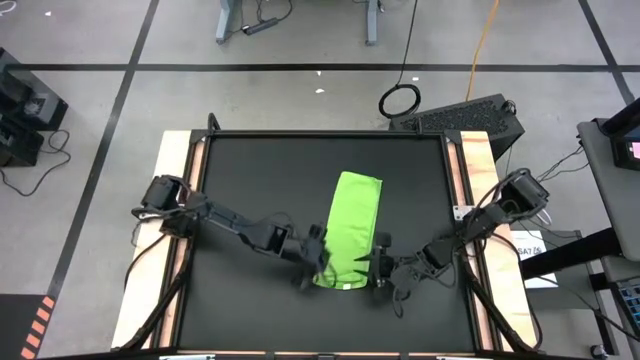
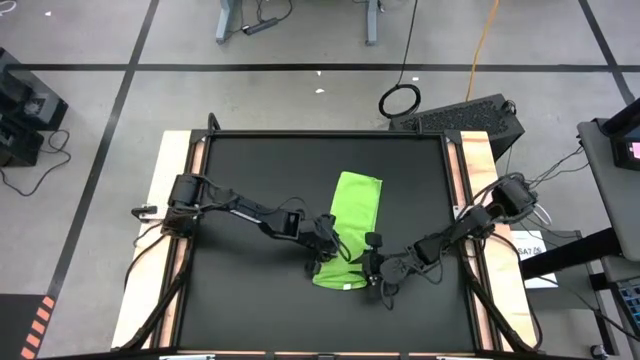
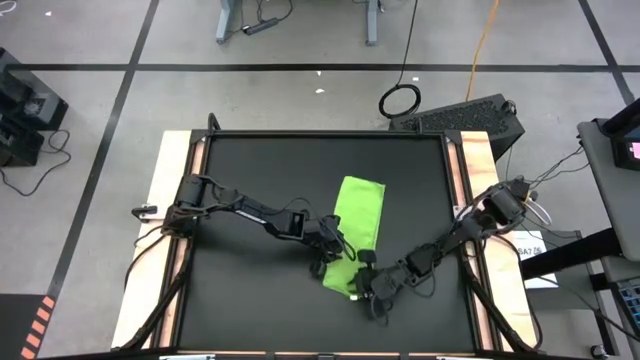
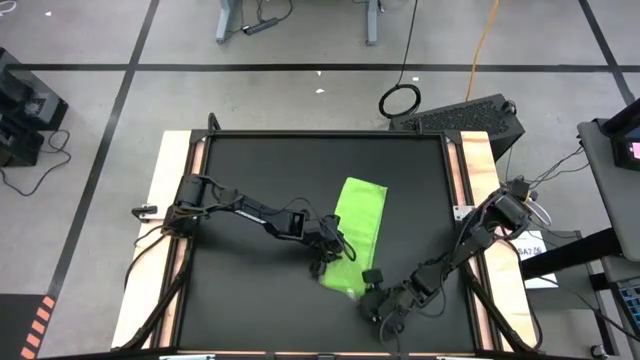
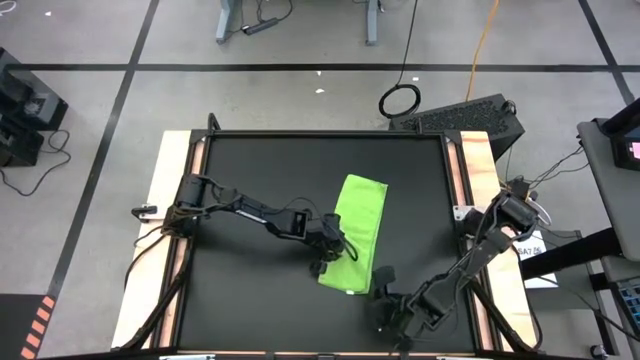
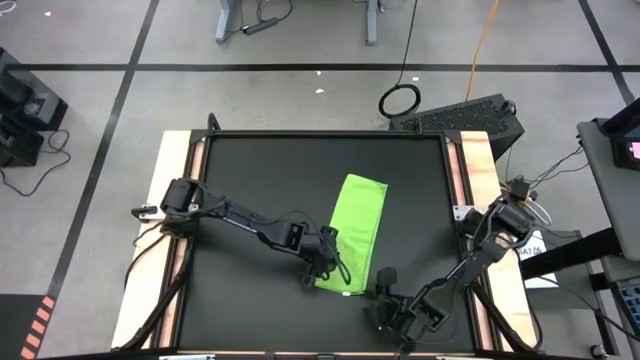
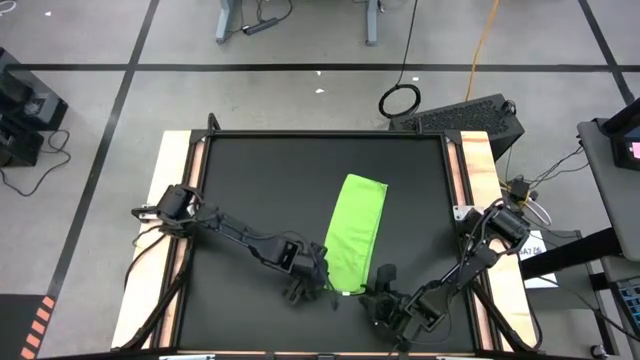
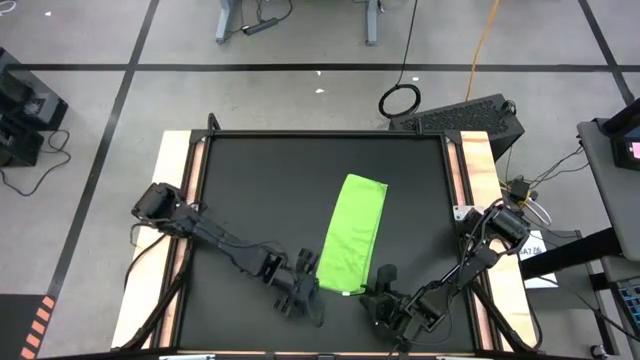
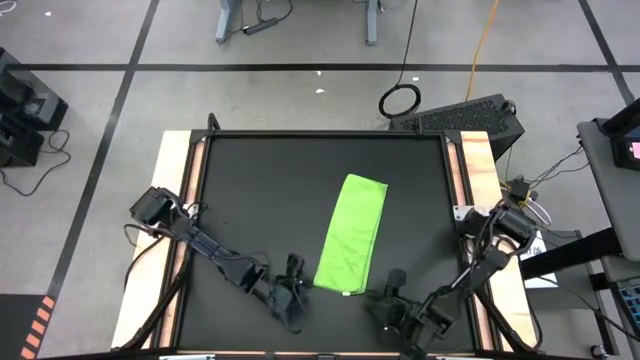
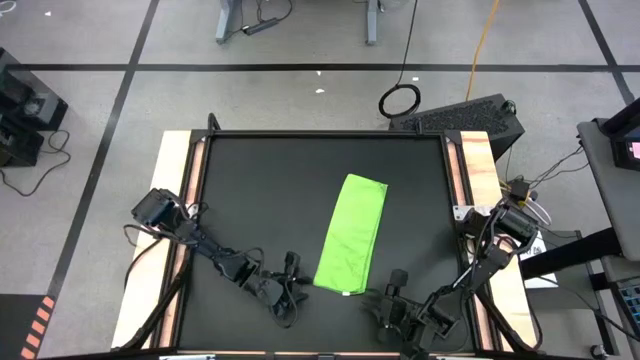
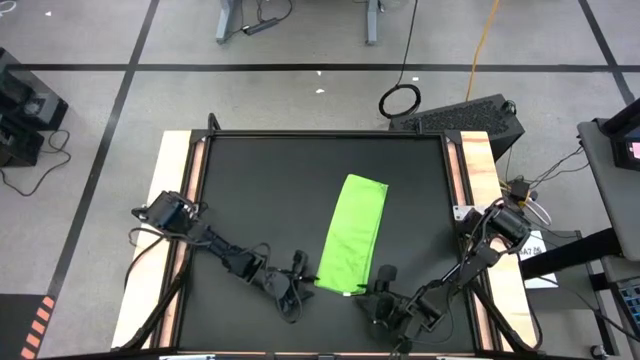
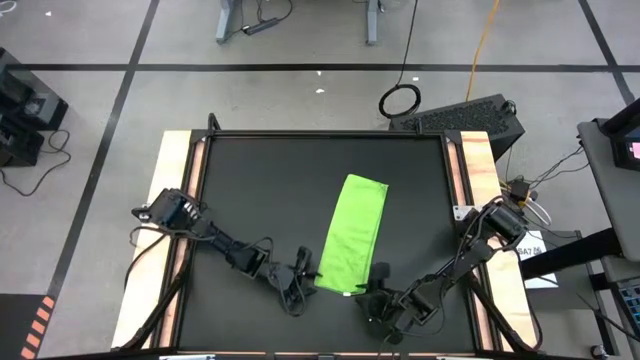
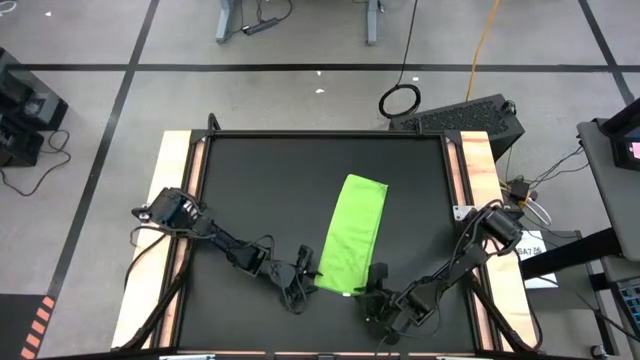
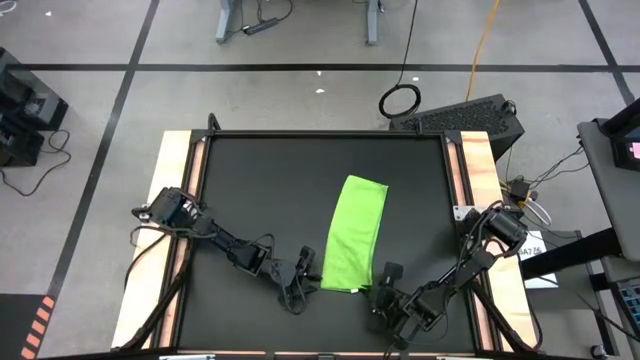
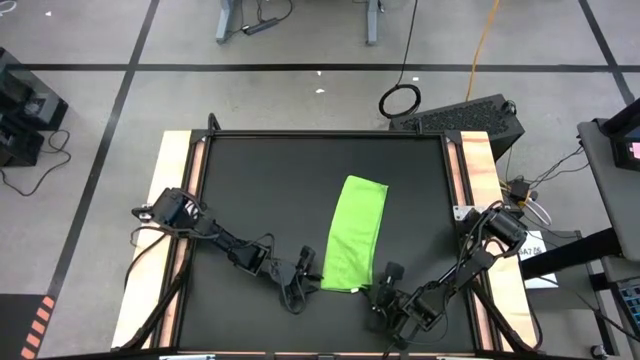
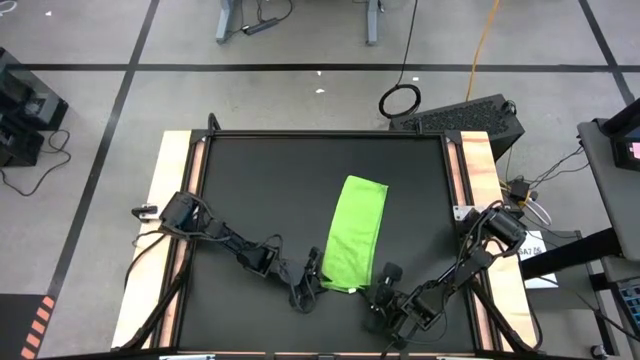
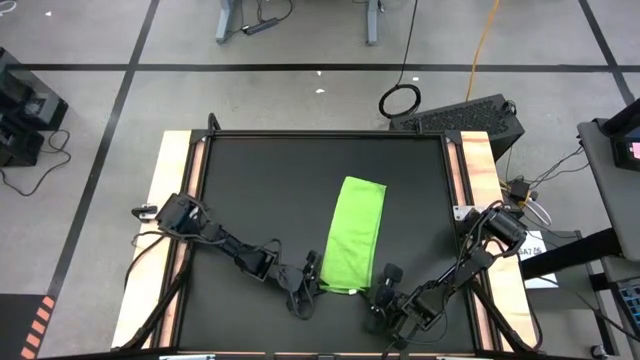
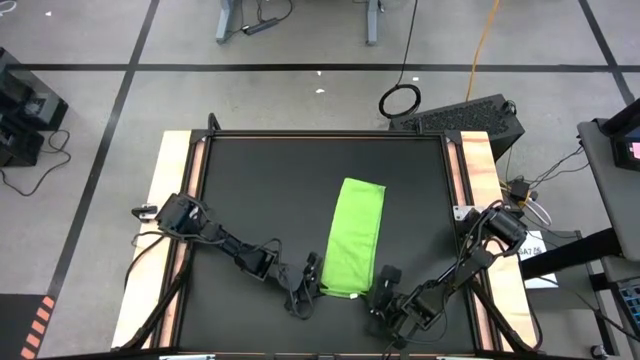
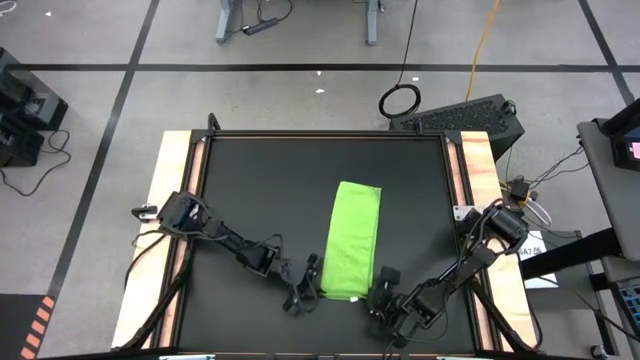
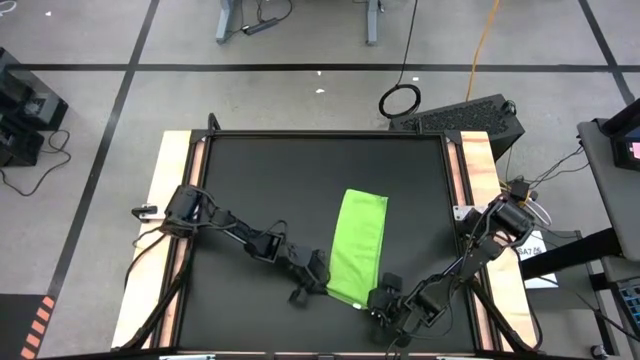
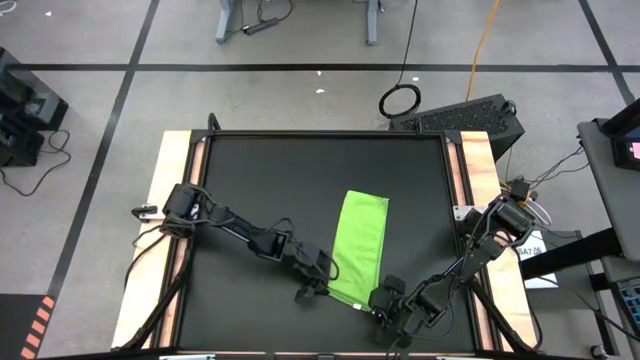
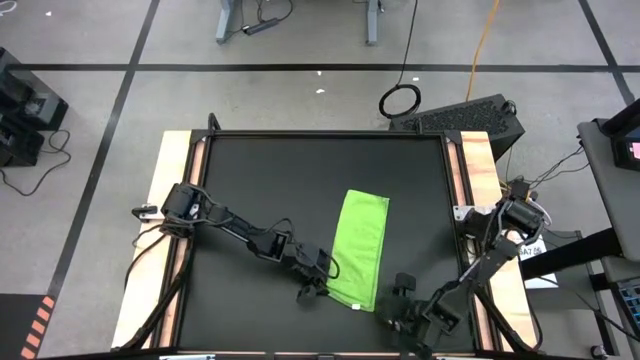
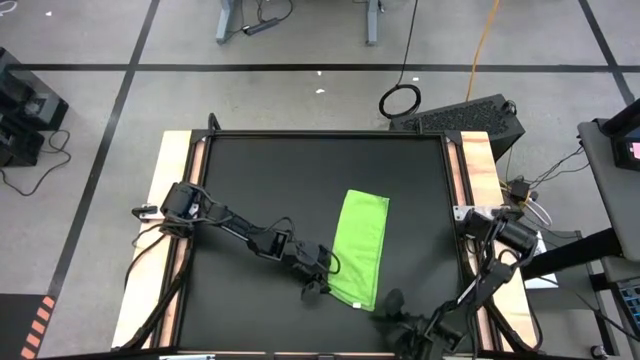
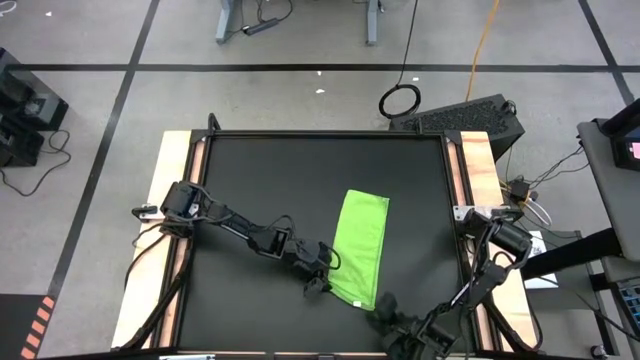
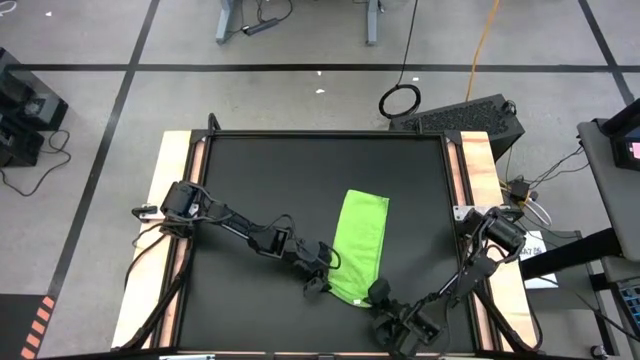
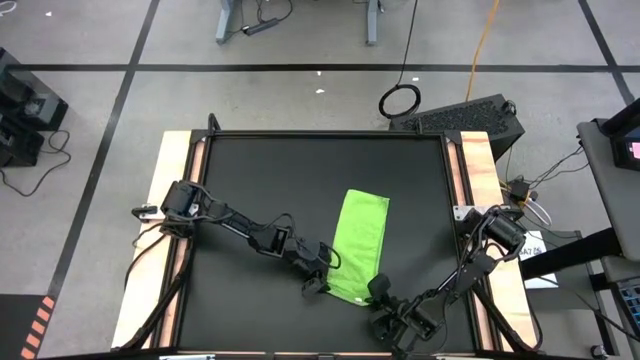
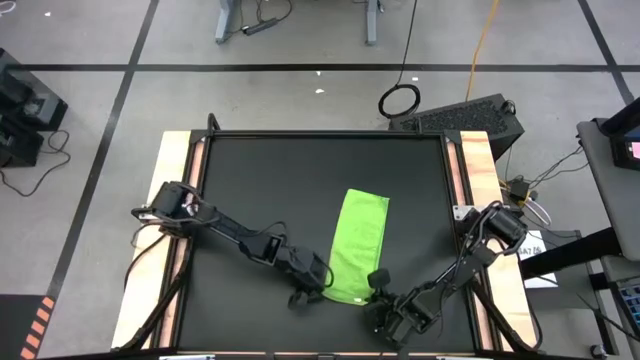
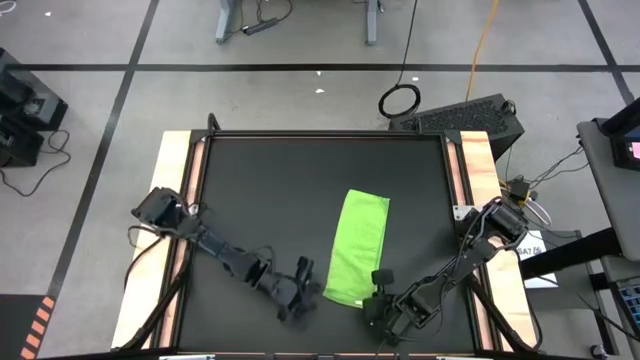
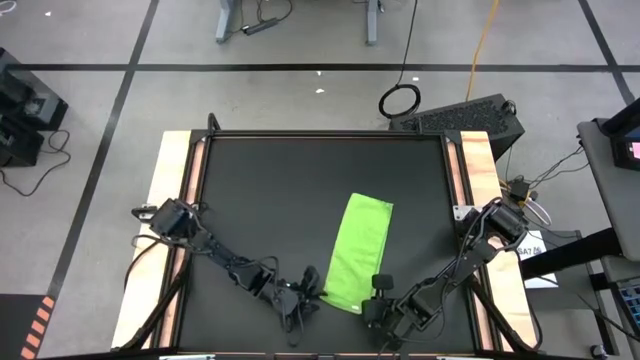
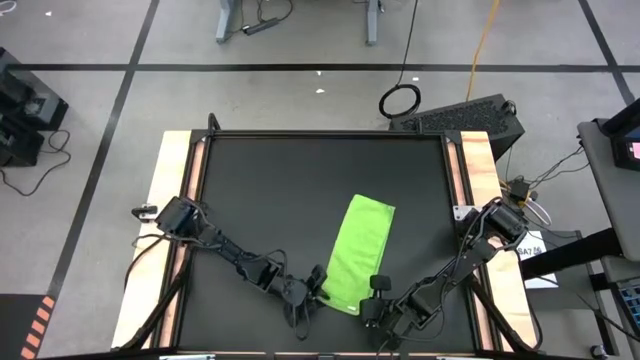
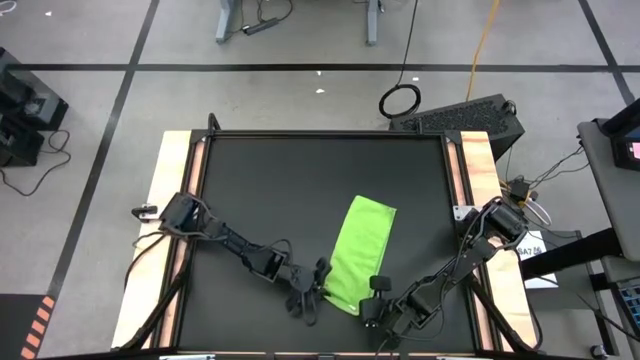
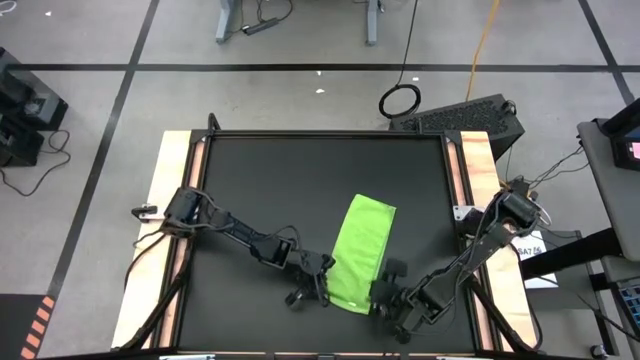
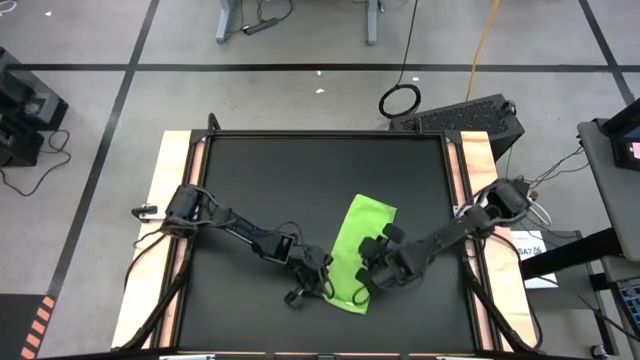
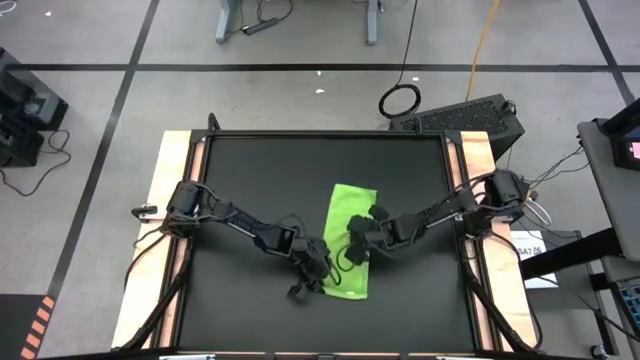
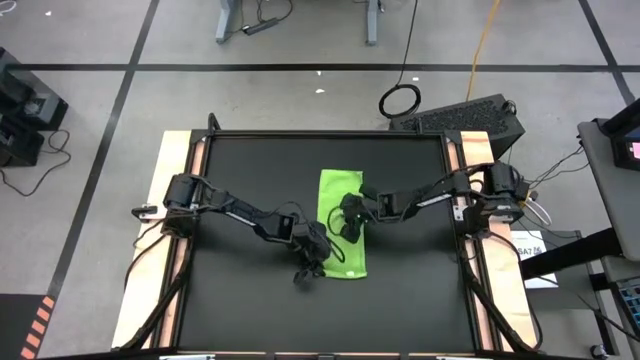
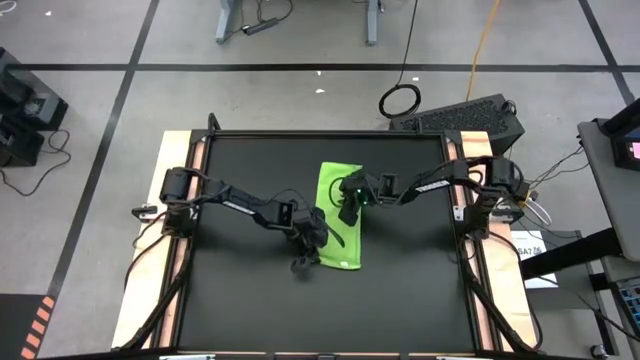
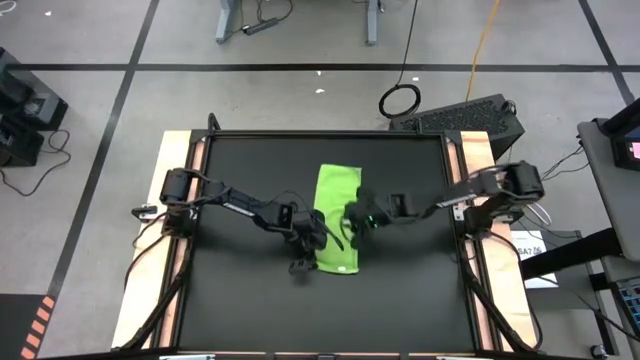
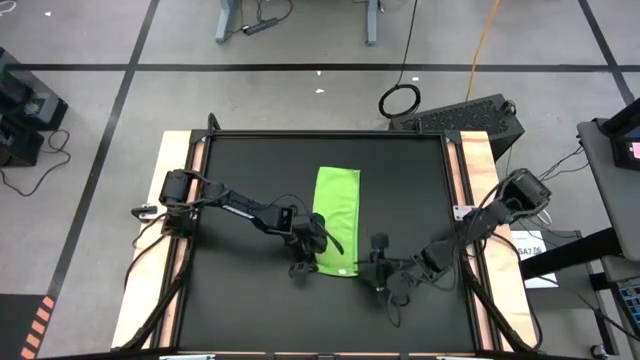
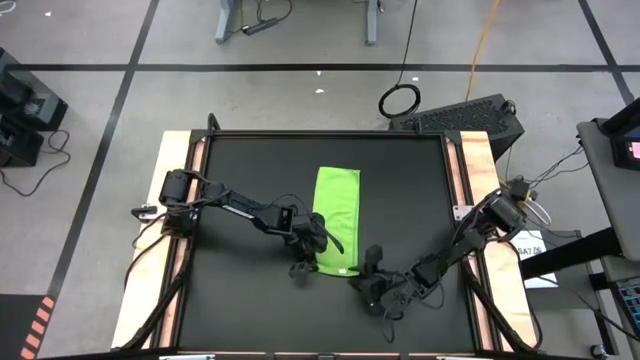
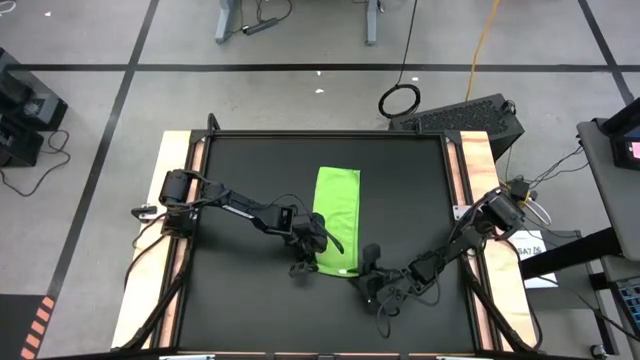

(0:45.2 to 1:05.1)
Task: Roll towel
Roll the green towel on the table

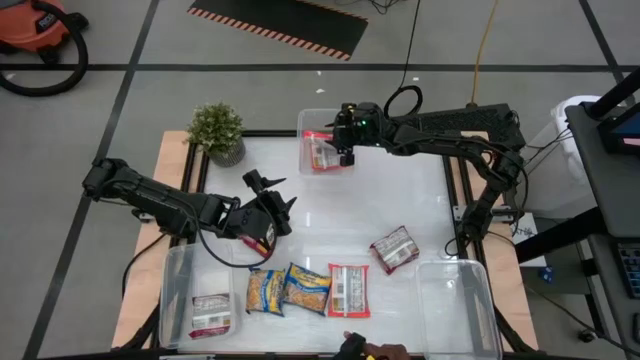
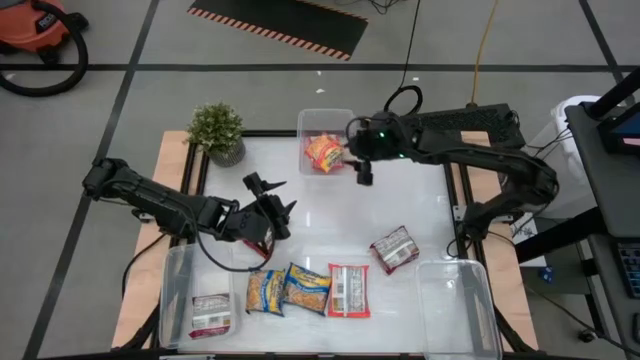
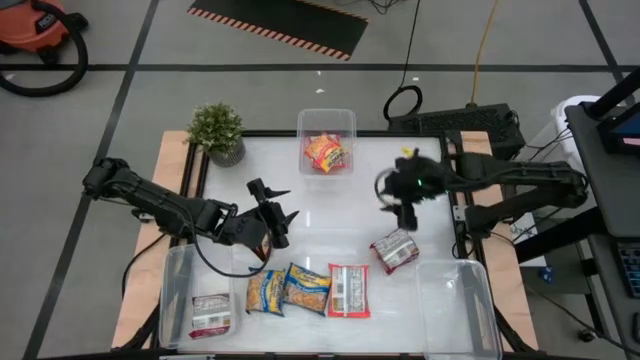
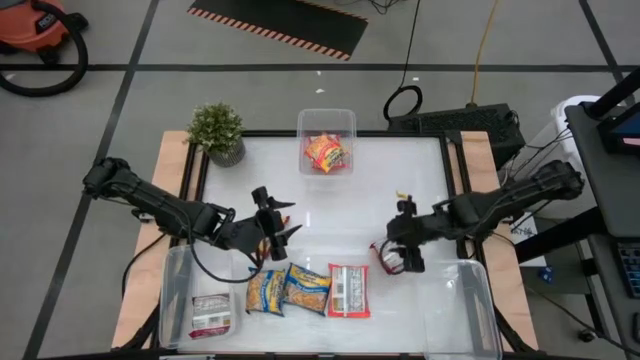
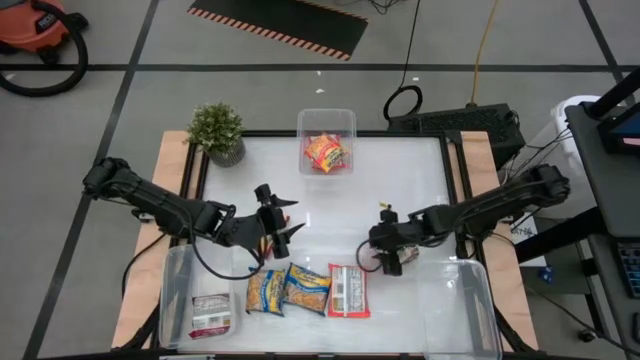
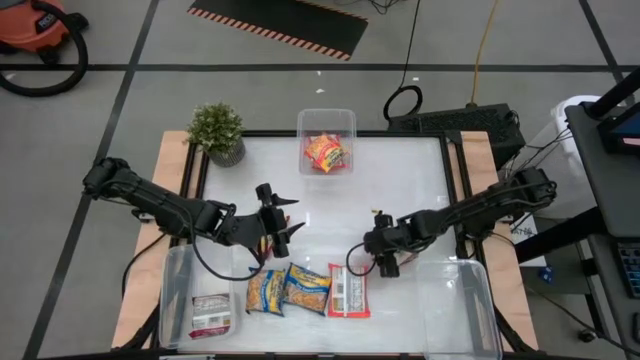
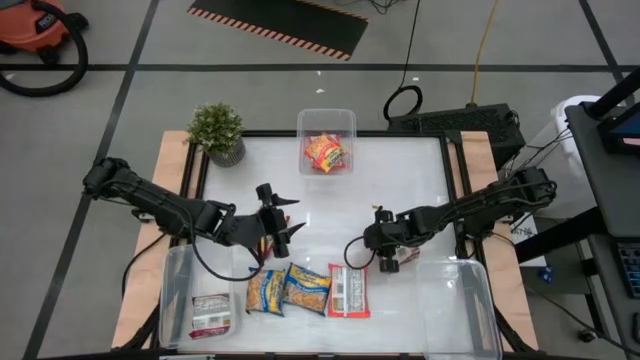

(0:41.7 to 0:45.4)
Task: Sort Maruchan noodles
Put the right red noodle pack into the bottom left transparent bin
